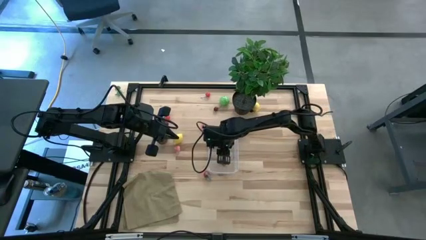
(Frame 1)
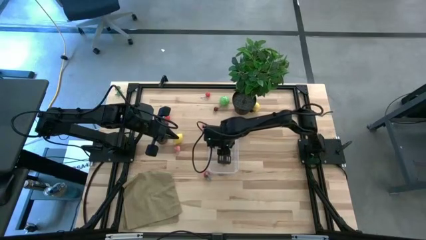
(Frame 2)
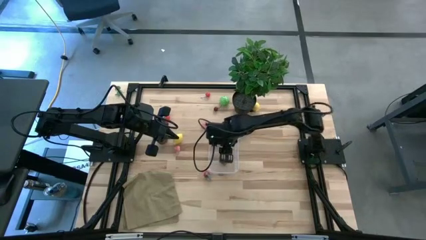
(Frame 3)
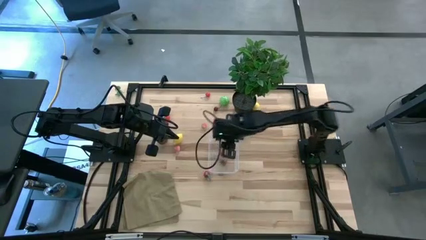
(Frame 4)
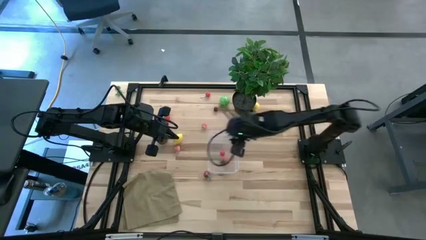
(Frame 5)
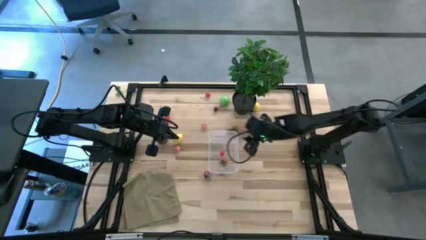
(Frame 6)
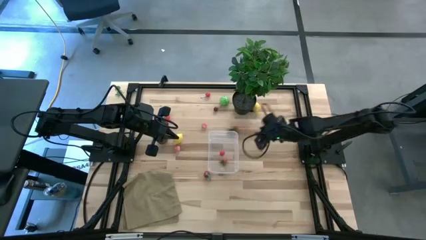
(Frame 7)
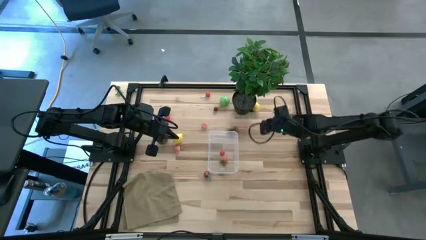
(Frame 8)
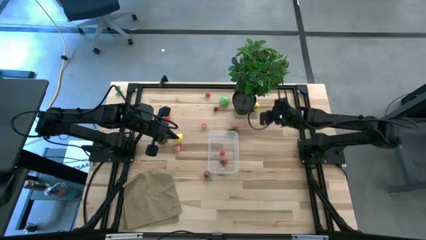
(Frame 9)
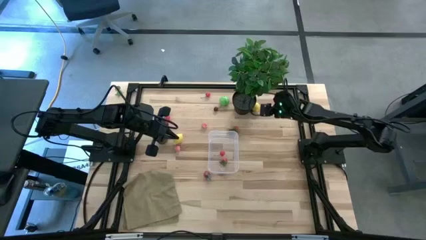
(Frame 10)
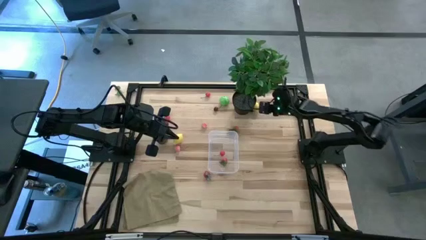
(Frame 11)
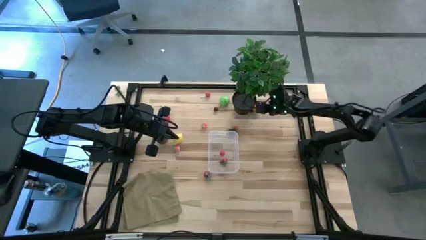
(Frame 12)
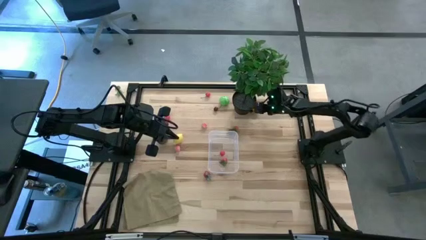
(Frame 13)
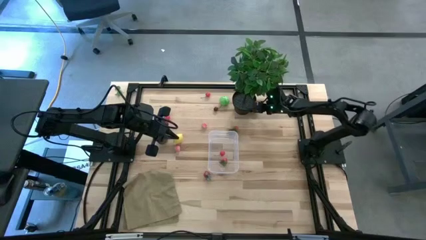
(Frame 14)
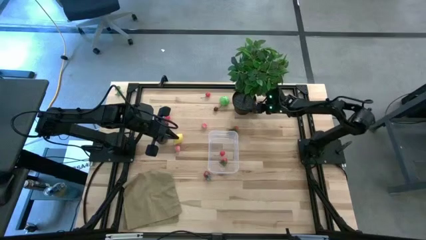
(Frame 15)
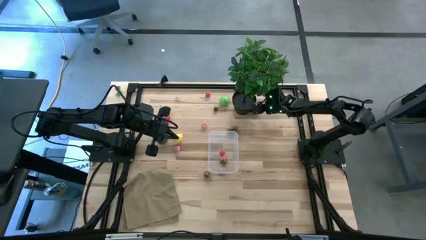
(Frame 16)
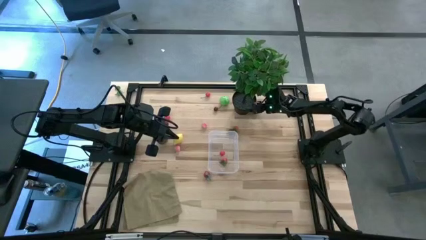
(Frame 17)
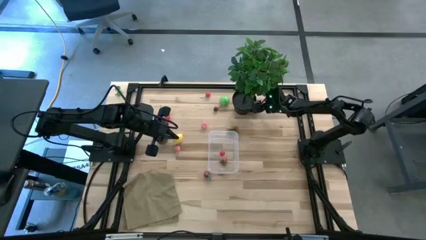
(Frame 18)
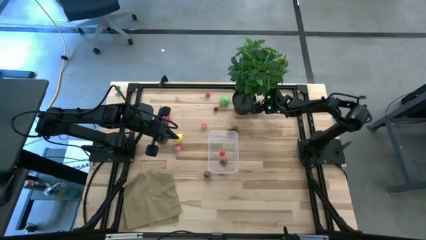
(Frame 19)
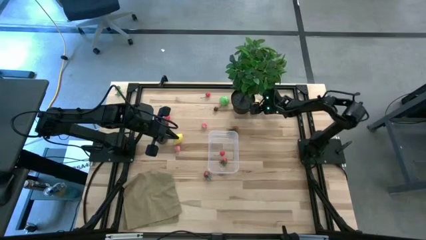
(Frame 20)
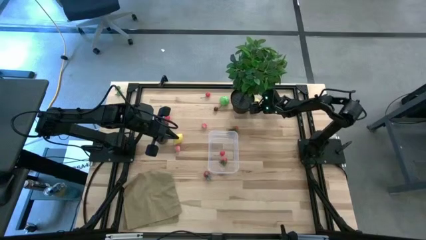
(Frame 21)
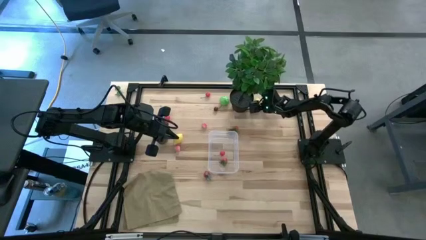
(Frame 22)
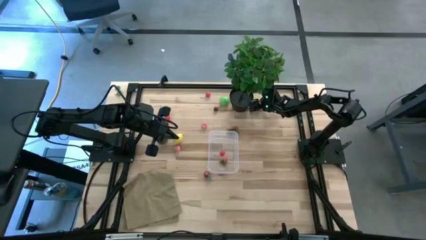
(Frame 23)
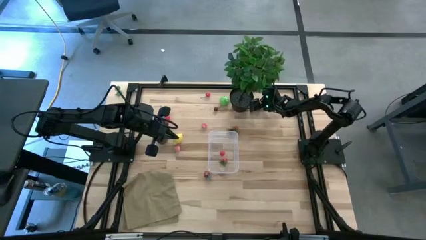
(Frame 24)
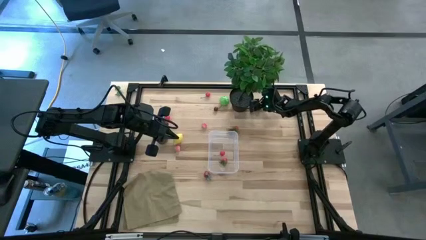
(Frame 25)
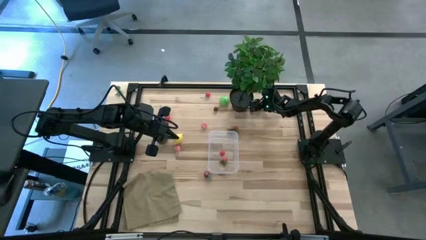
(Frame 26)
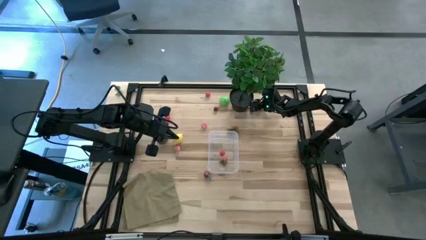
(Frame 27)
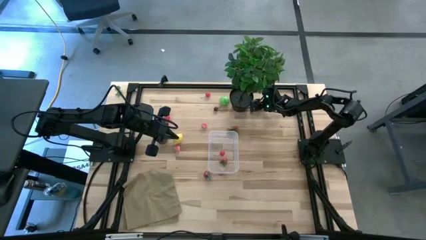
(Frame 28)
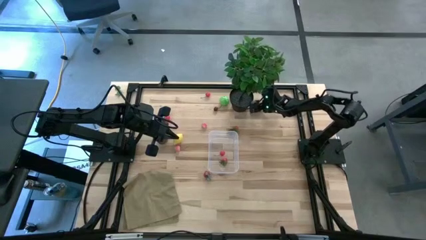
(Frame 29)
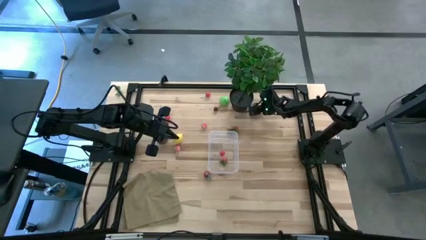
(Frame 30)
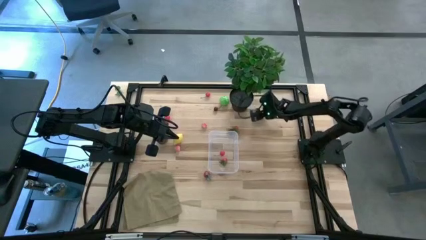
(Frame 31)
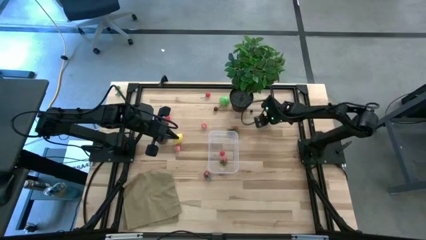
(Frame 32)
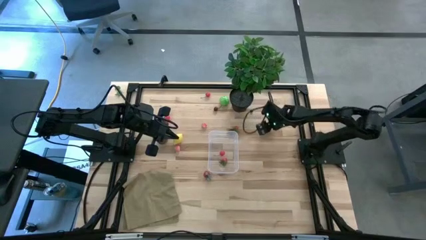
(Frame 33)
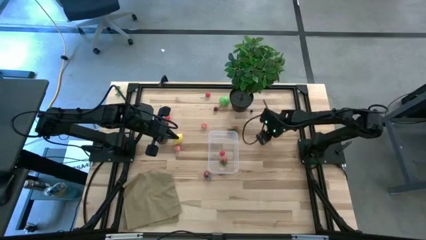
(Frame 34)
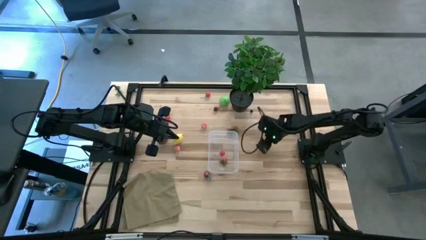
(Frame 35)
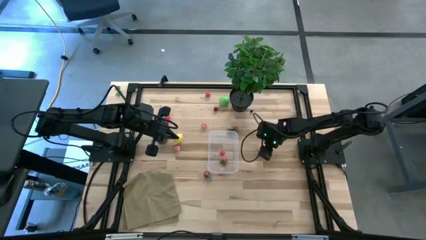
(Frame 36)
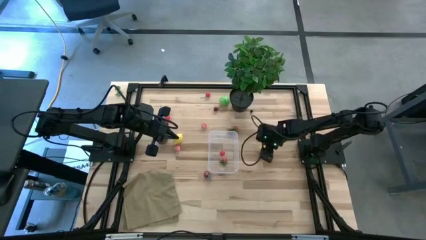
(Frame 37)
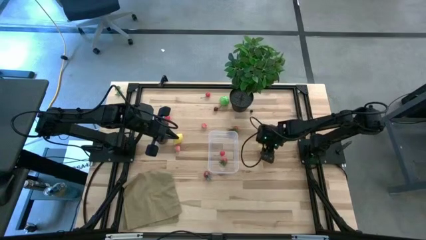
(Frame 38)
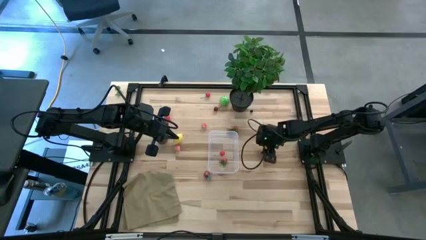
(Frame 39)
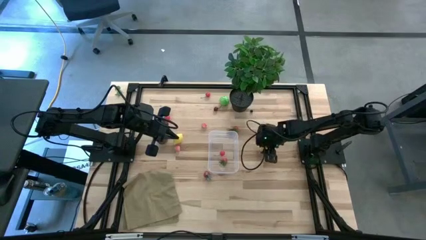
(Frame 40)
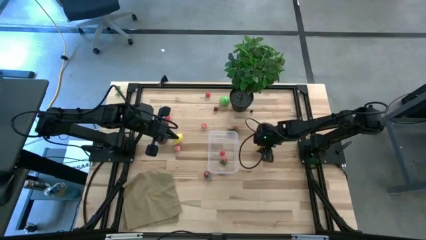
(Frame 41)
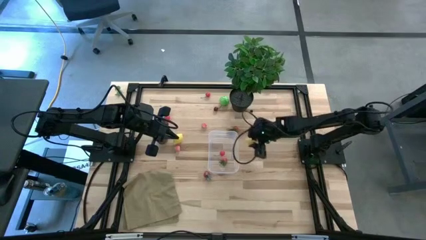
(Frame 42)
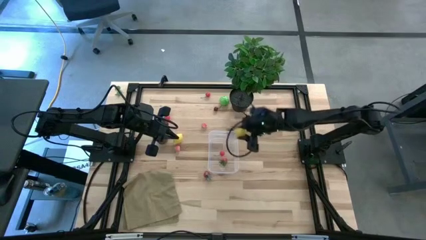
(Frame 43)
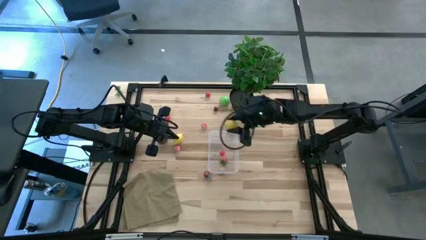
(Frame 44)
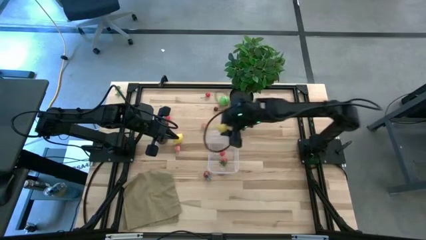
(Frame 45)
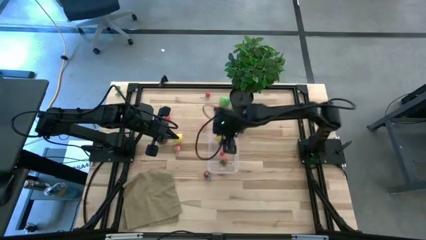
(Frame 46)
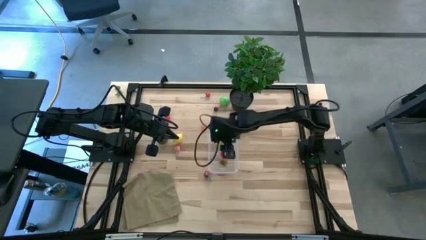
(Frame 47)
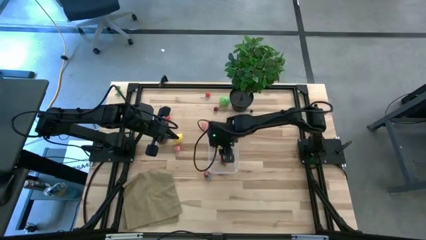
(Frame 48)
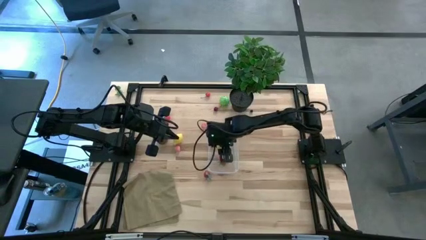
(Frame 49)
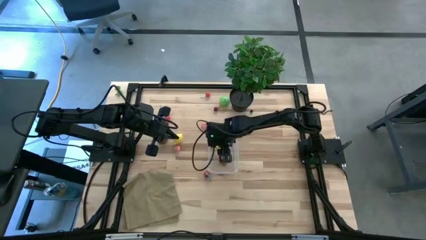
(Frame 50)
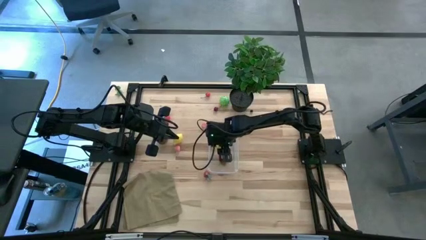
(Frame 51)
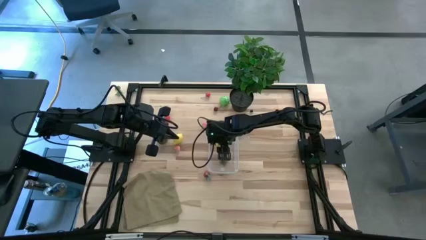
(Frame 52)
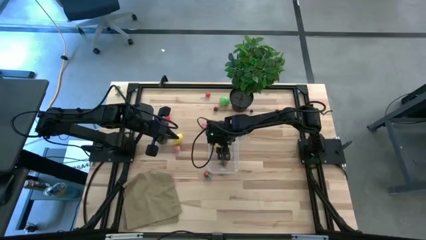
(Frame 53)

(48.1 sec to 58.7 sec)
Task: Pick and placing Produce into tupperware
Put the lemon into the transparent container

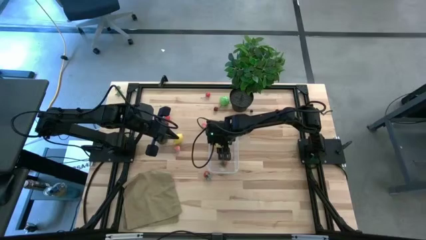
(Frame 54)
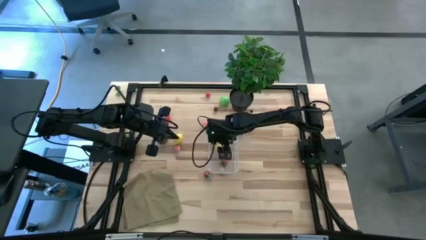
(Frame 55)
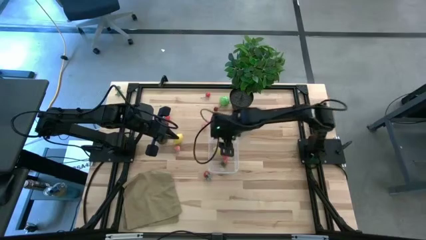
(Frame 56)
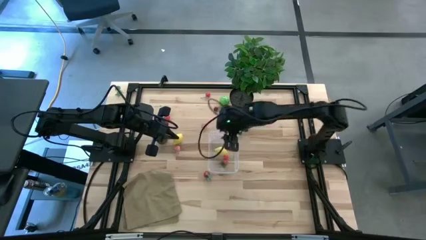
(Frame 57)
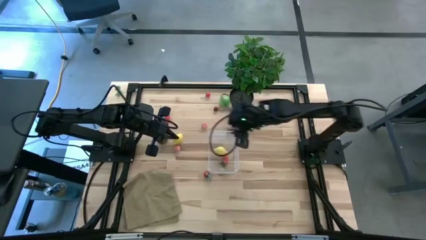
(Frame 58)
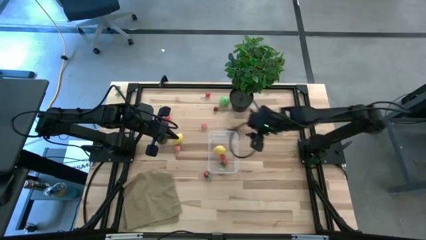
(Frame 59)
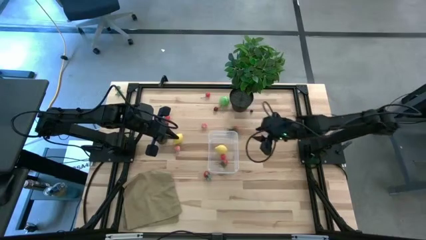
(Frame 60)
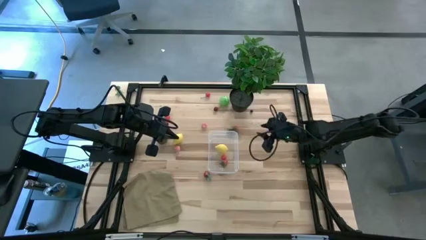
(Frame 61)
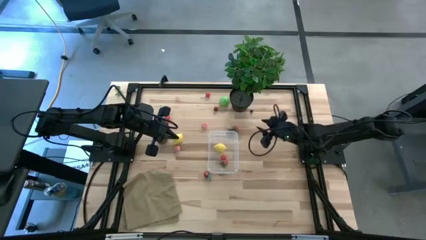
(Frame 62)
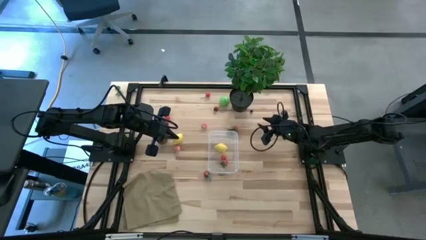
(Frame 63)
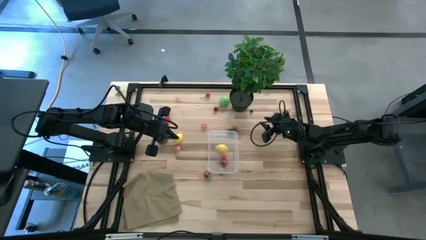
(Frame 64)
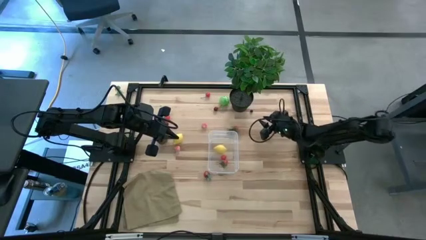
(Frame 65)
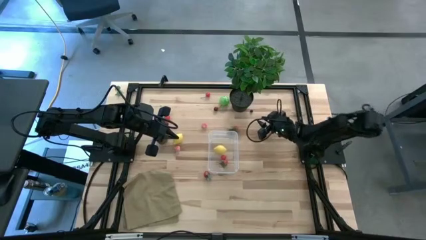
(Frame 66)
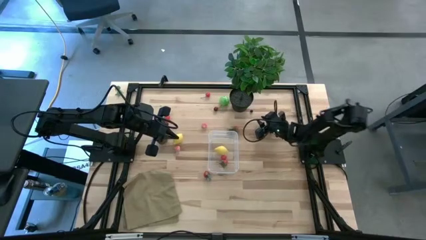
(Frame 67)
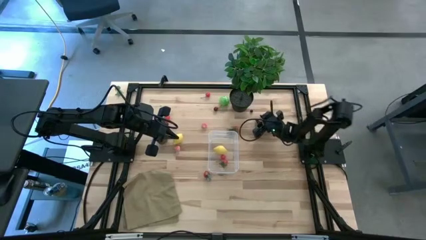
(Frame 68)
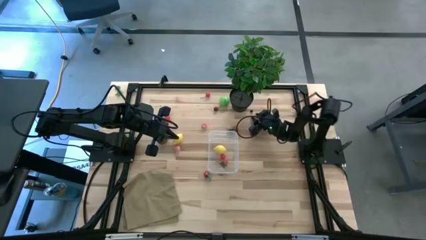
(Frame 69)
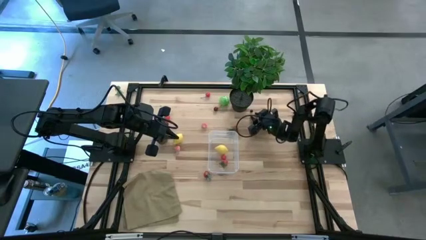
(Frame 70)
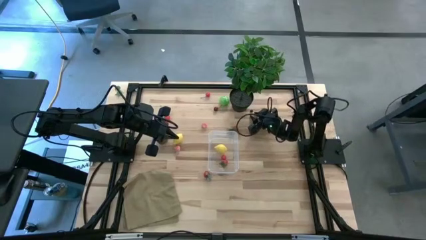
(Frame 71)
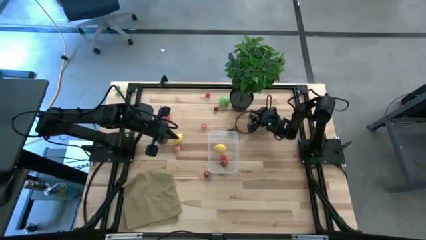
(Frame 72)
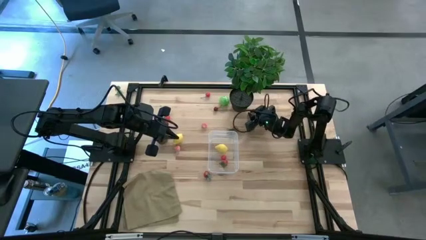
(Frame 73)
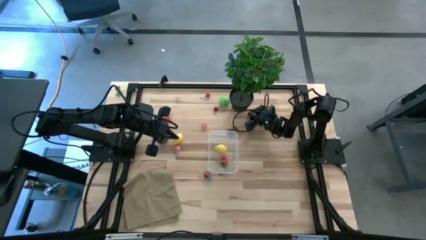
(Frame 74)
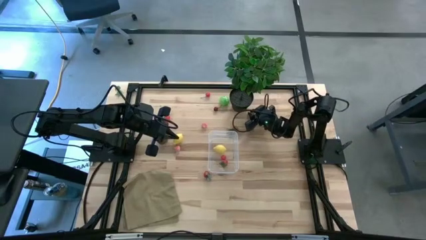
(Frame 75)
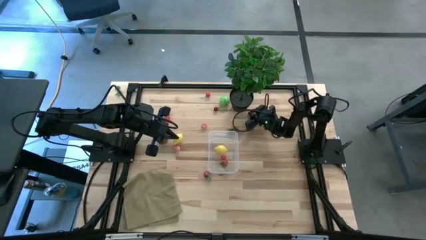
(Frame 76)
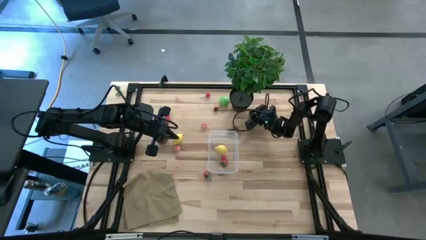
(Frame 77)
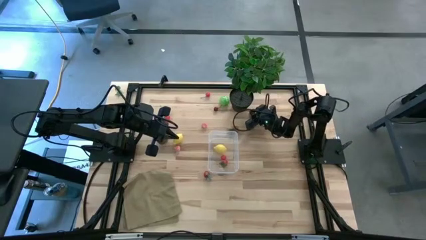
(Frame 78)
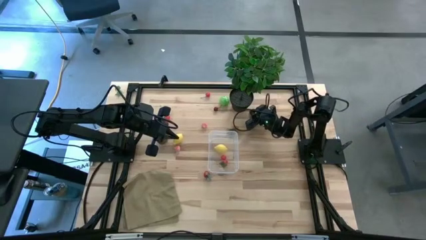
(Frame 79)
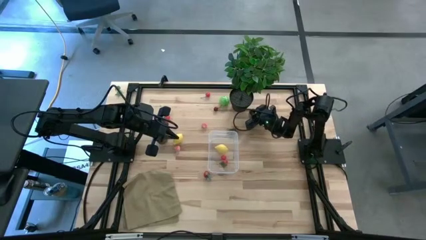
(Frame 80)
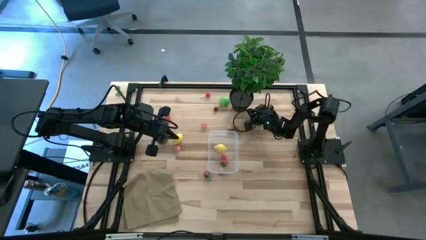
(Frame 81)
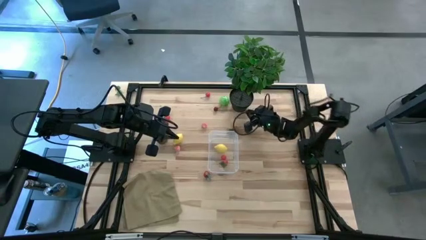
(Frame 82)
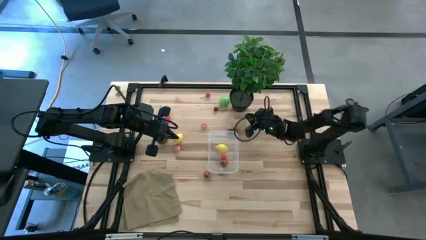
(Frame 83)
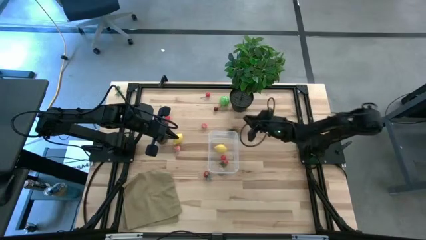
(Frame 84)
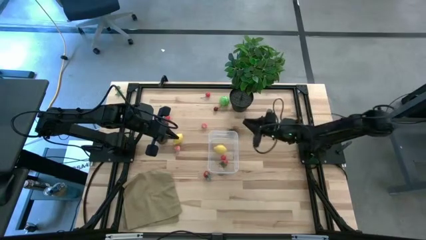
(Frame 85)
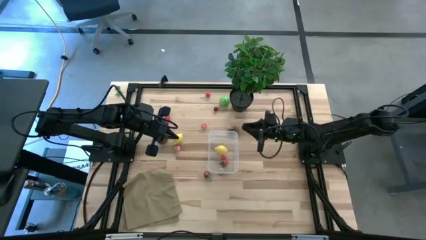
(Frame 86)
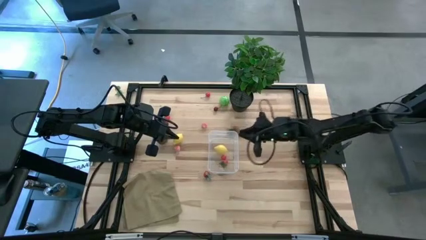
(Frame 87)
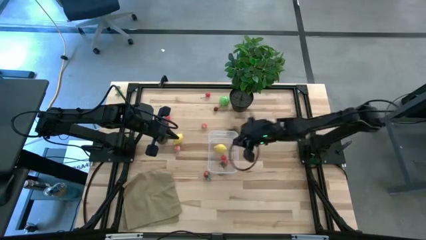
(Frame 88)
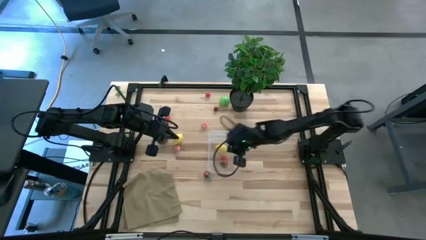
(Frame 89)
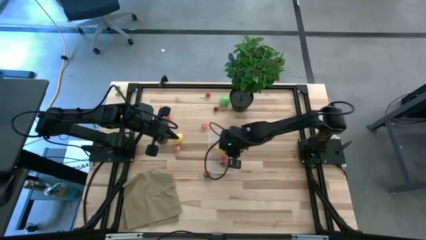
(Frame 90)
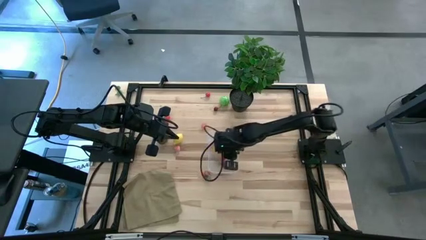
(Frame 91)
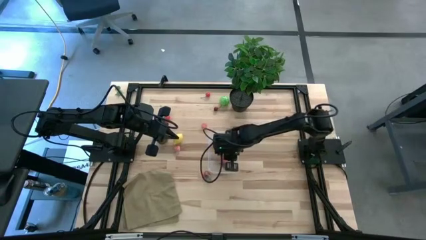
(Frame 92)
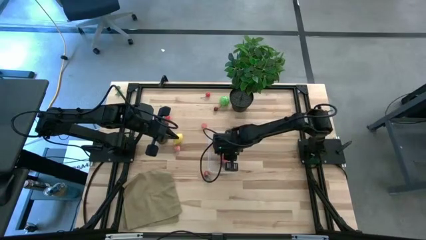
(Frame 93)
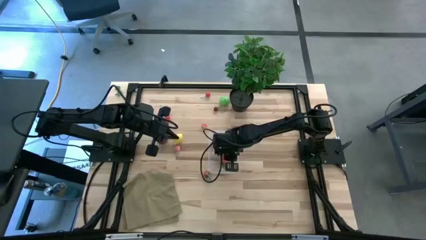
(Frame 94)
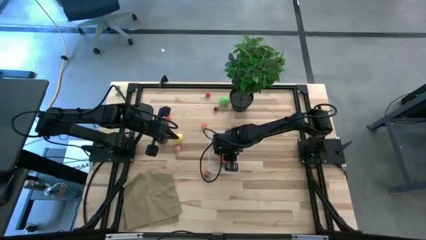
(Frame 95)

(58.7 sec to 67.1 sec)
Put the blueberry into the transparent container
